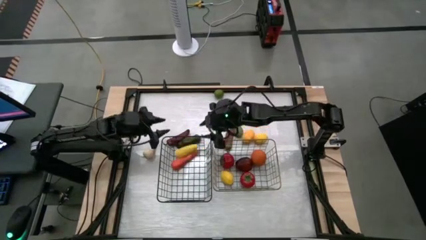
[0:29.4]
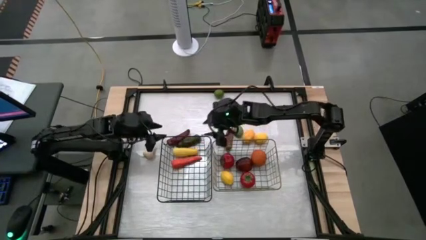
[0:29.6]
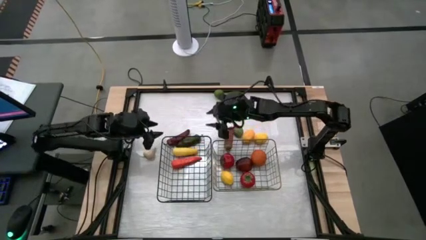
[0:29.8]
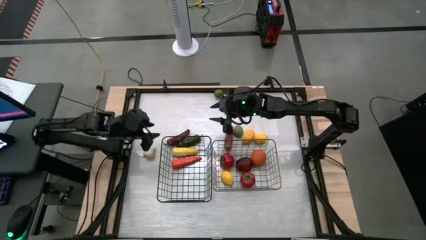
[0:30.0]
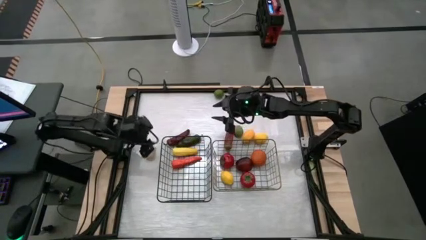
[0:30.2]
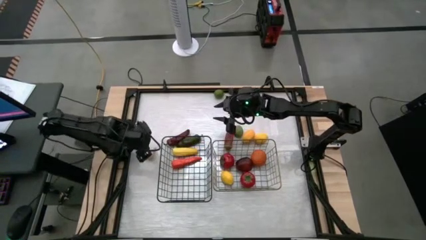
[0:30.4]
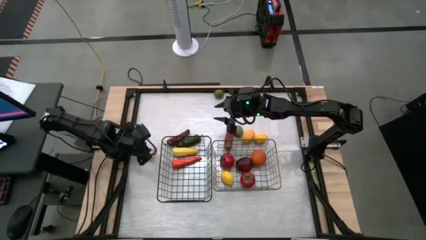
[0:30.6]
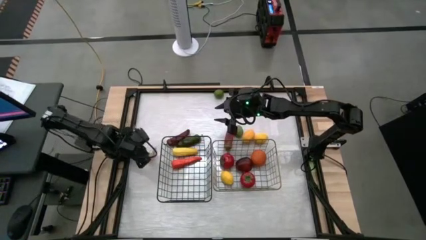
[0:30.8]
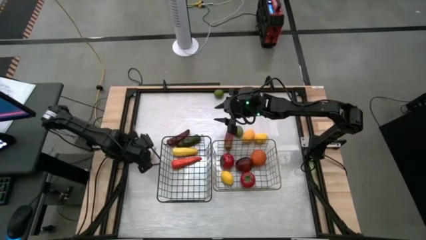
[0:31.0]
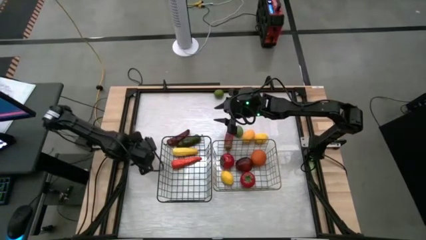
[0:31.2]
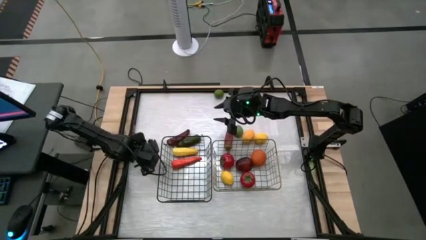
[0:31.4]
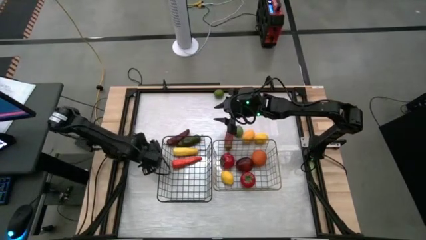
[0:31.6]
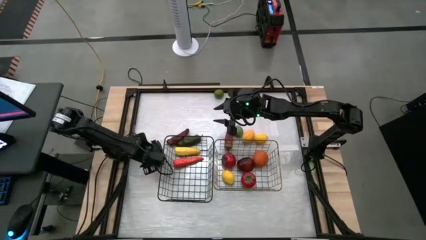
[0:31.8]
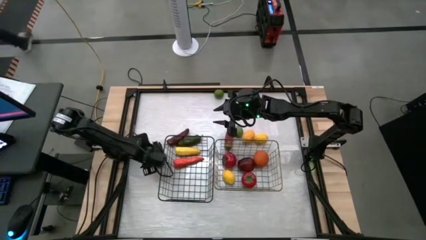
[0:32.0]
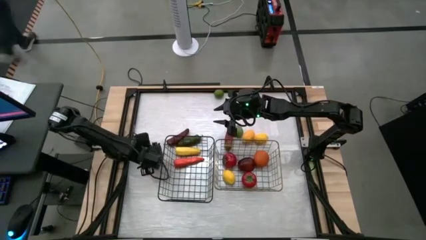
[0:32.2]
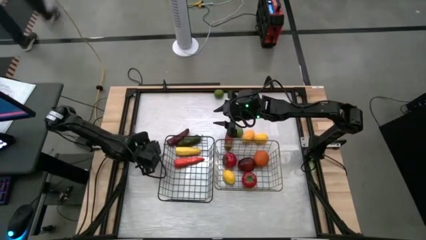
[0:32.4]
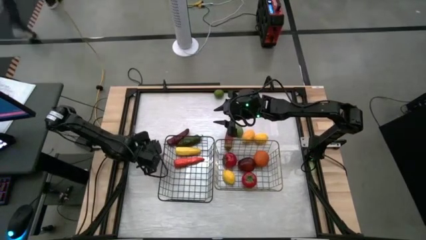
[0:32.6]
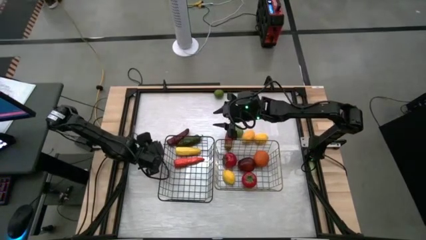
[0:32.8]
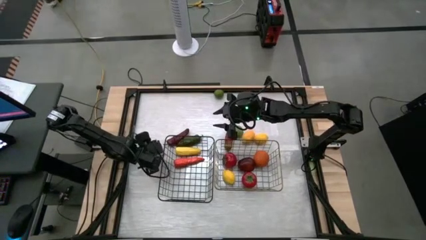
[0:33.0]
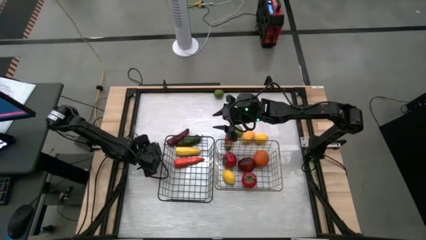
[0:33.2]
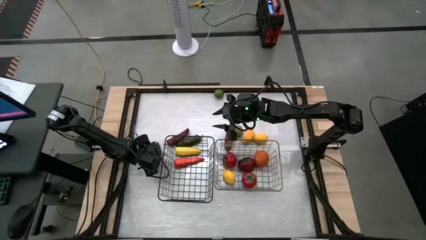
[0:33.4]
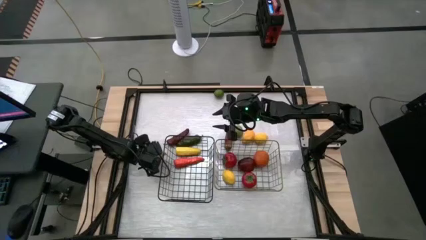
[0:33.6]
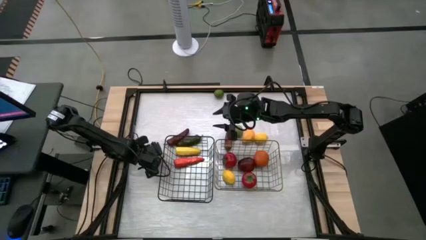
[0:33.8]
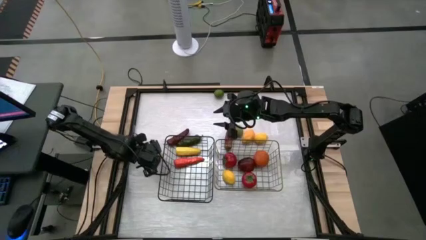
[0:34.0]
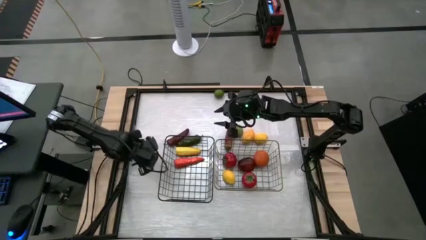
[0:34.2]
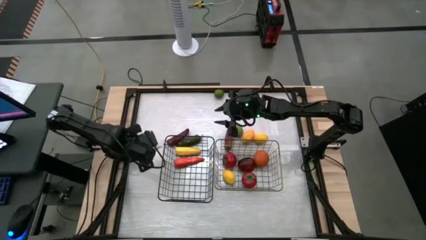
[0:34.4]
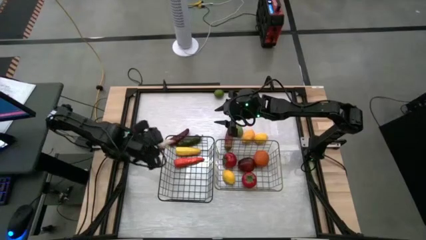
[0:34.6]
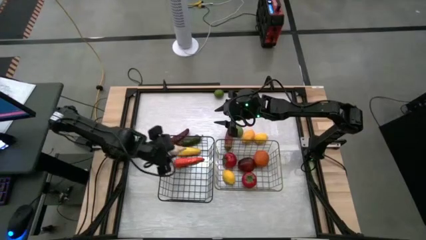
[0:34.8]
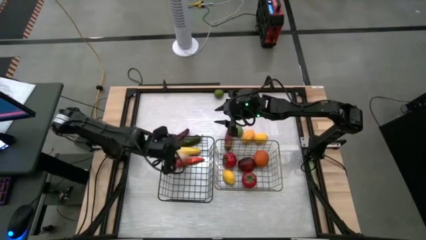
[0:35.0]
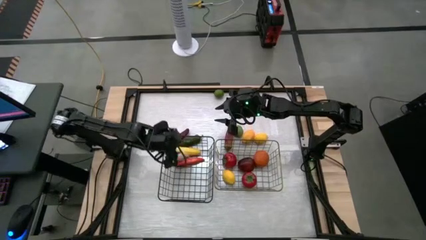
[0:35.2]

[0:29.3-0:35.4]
Task: Sort produce into baskets
Put the garlic into the left wire basket

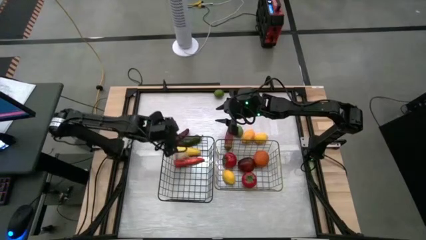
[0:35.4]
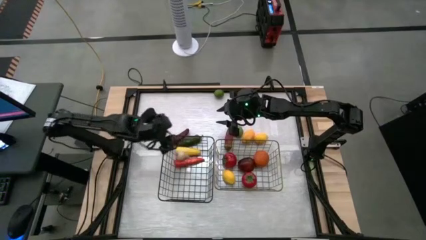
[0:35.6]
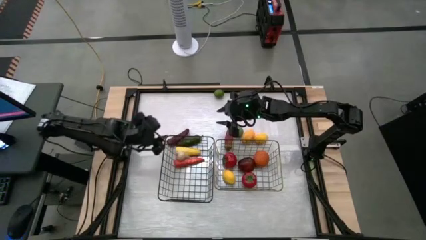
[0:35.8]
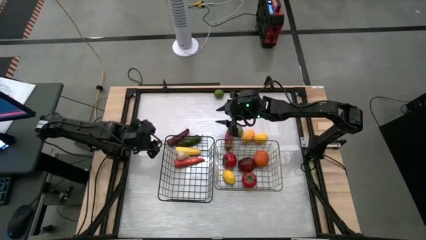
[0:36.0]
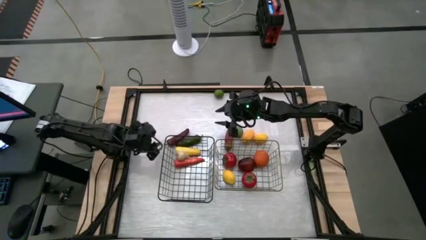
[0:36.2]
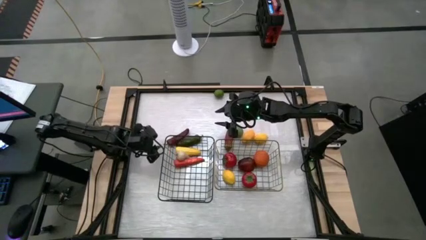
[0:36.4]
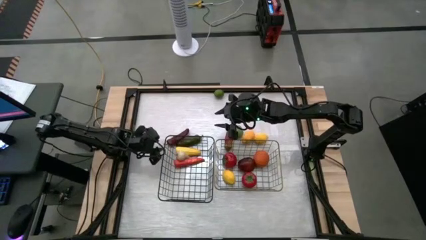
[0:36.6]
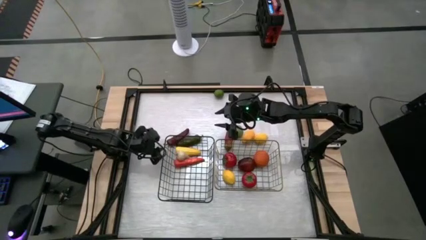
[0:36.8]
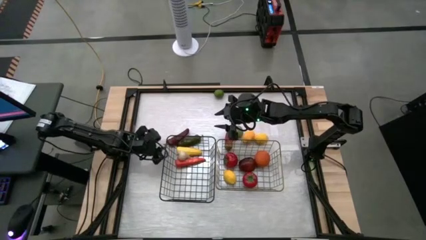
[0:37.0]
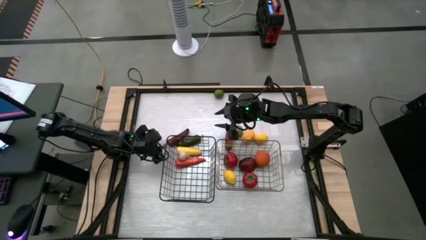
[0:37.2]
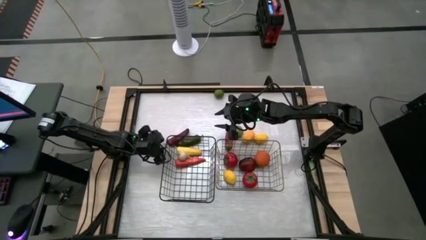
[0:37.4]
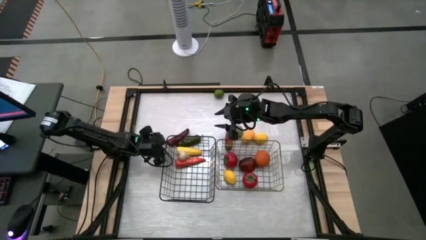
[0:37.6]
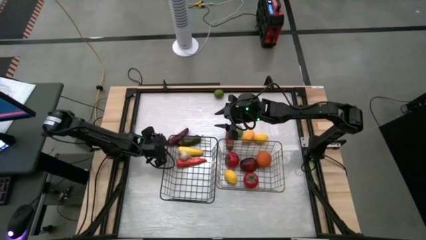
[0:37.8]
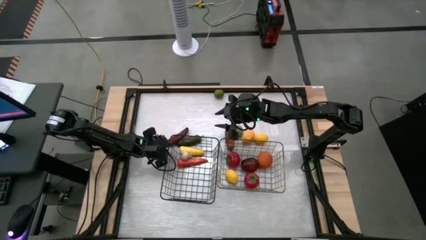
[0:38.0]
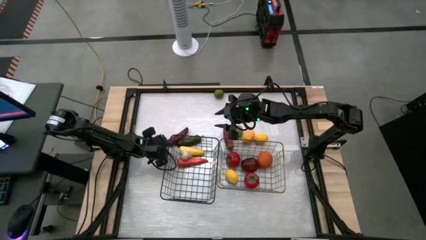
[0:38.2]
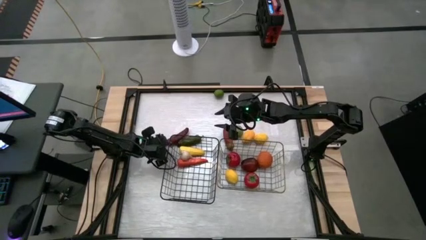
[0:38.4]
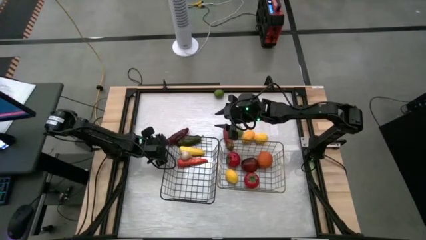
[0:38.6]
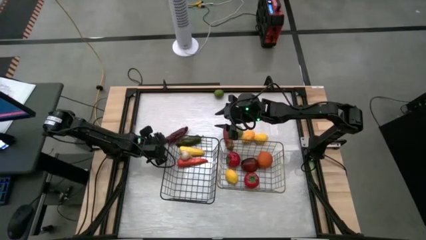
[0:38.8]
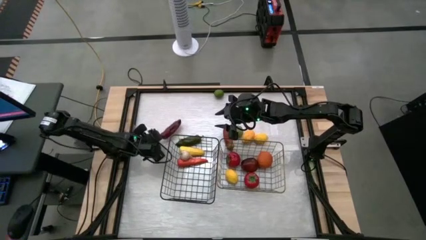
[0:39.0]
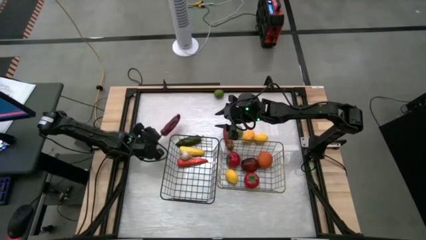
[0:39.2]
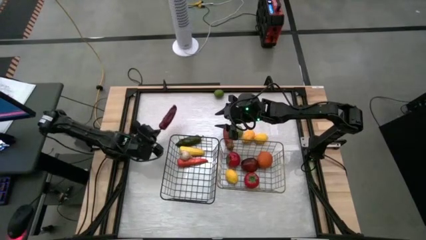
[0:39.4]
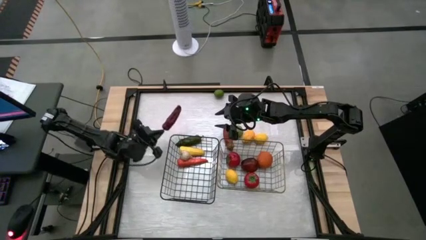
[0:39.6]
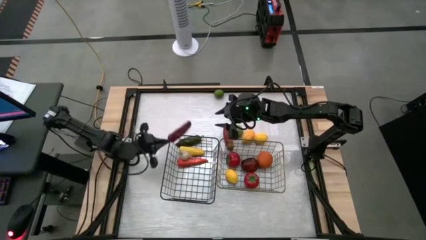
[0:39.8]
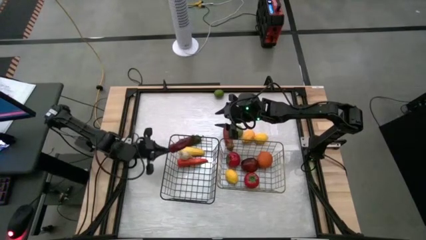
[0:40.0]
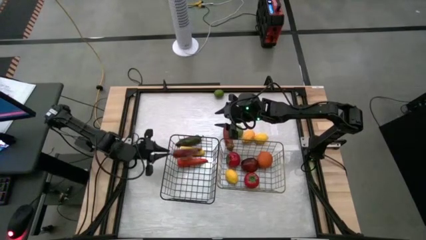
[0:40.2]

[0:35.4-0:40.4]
Put the left red pepper into the left wire basket

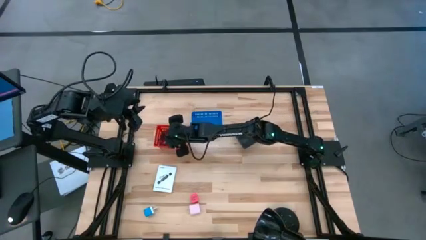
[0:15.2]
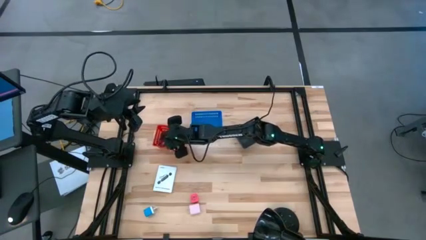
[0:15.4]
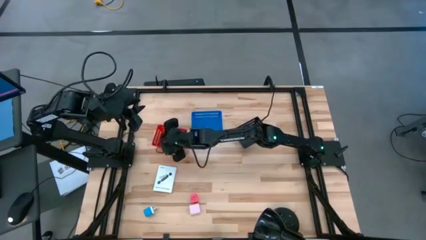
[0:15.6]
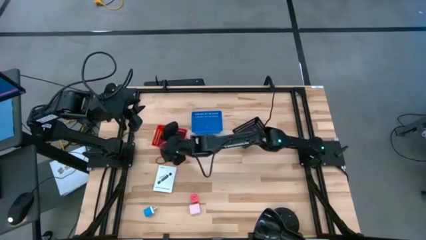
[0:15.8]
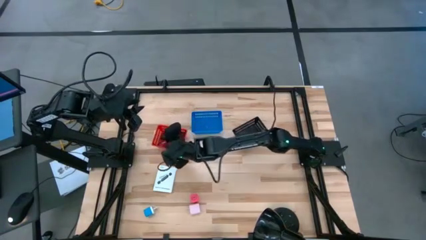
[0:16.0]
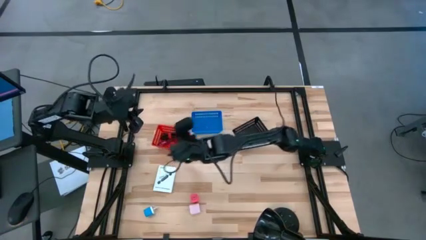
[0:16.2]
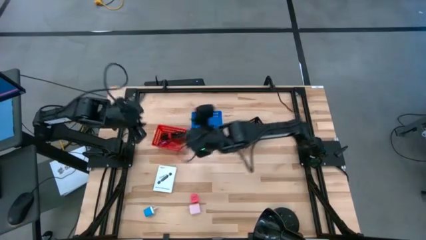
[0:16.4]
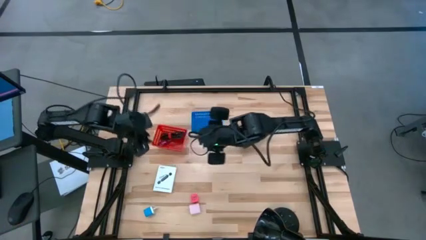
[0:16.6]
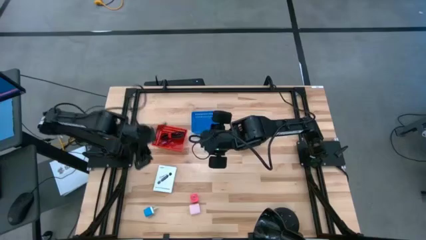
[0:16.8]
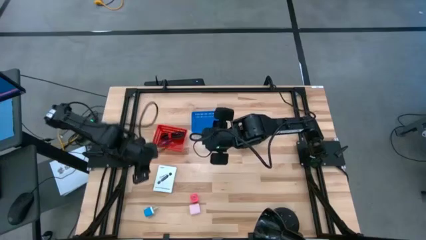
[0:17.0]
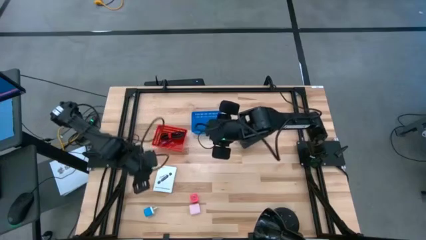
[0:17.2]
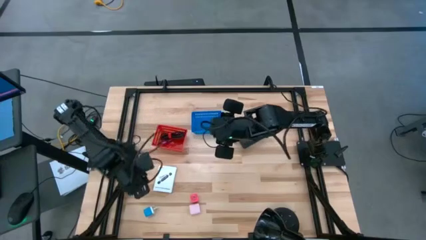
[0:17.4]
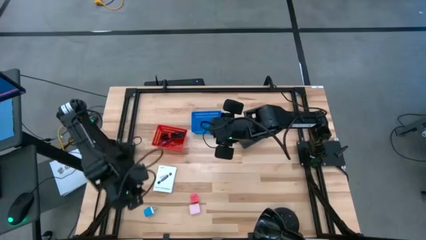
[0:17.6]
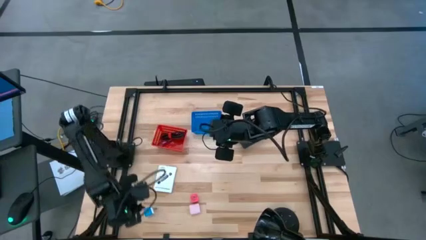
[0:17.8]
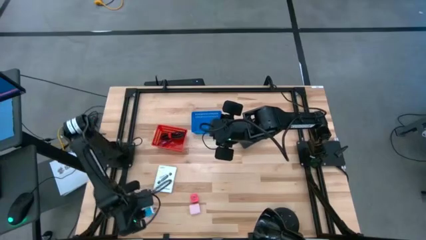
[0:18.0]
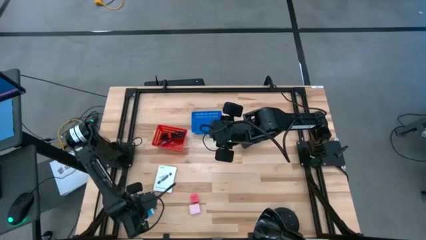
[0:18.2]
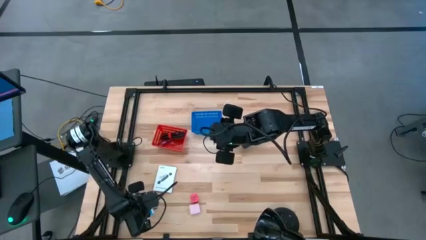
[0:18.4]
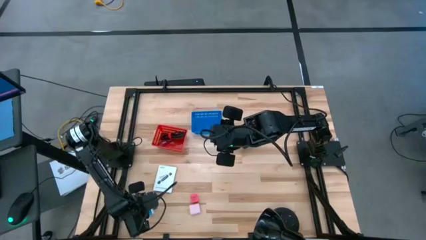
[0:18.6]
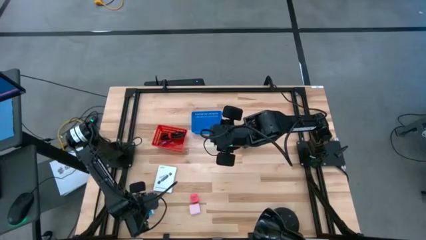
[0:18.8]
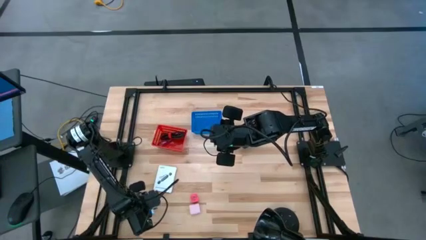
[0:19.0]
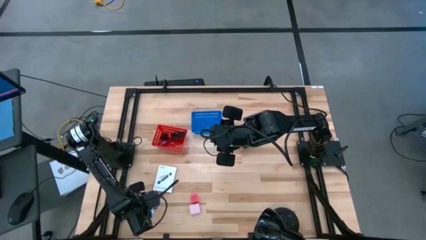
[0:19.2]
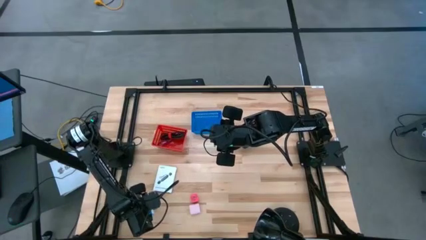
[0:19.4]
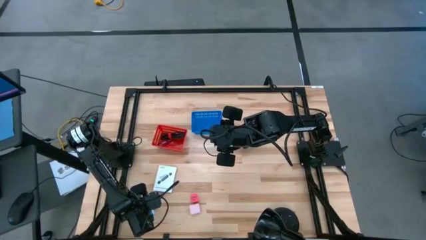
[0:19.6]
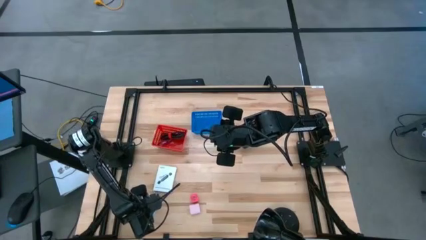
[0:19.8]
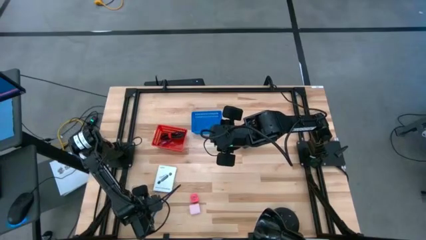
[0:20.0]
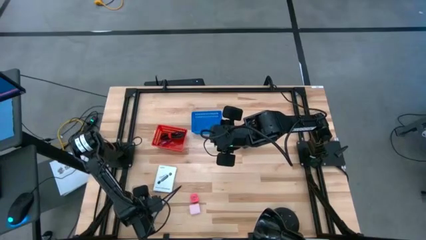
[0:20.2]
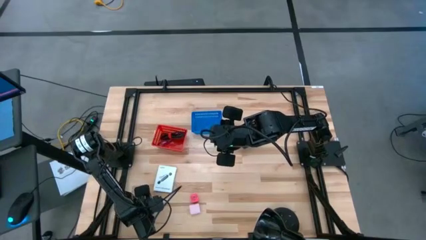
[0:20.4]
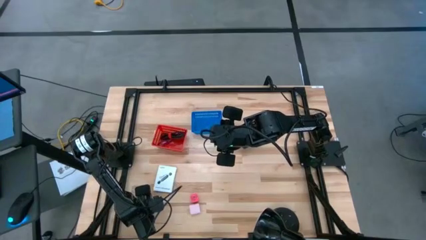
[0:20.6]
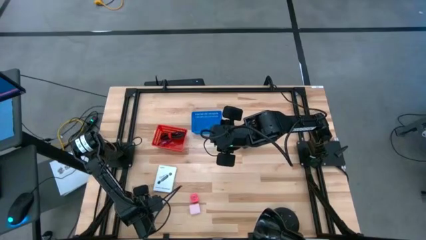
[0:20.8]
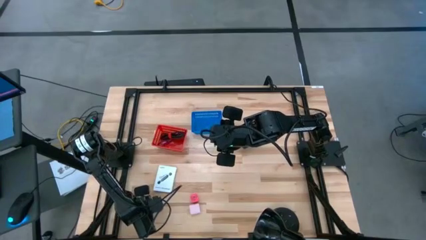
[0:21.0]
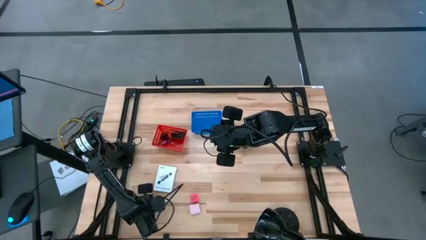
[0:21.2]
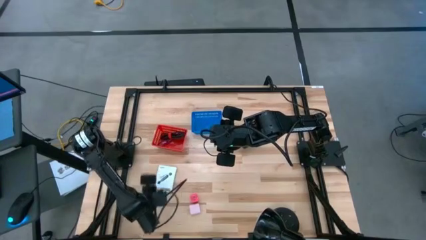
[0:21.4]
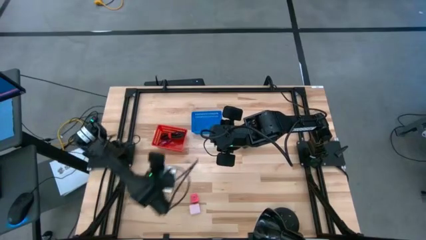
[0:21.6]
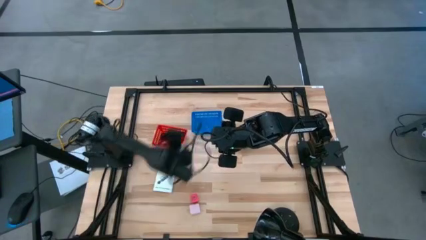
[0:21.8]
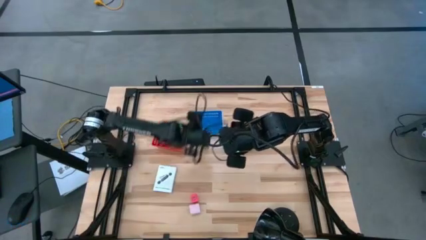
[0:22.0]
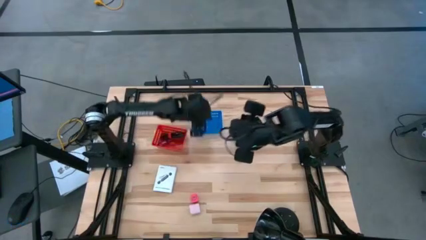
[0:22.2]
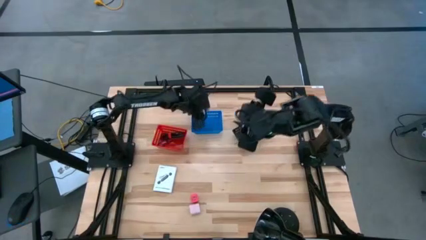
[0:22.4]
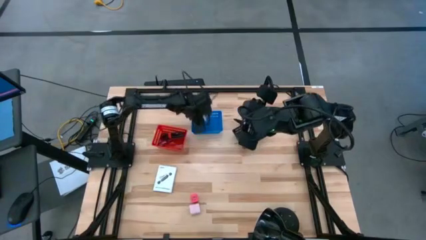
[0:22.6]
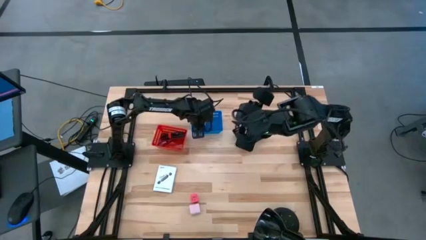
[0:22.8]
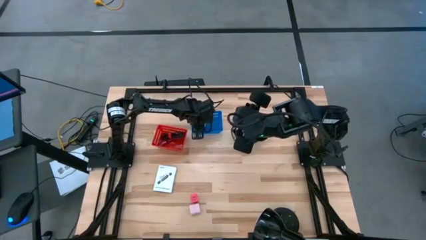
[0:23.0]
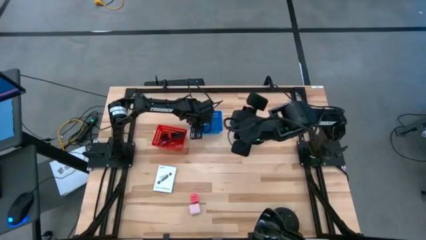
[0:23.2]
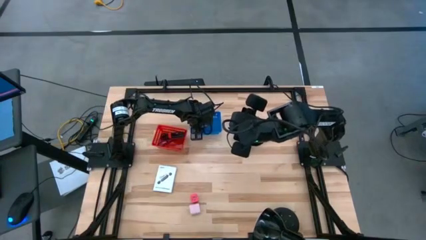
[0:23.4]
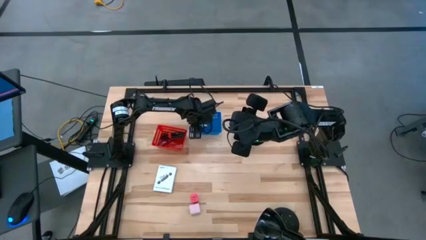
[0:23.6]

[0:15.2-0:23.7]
Task: Pick and place items into bin
Put the blue charger adapter into the blue bin
